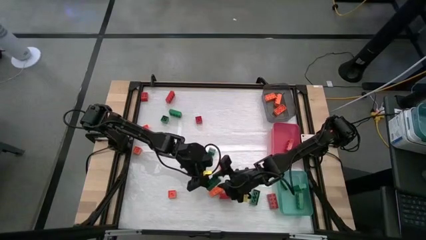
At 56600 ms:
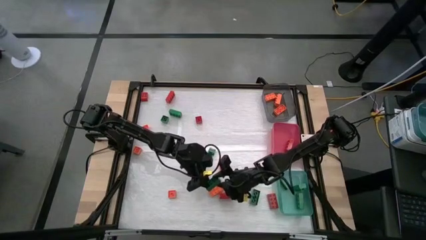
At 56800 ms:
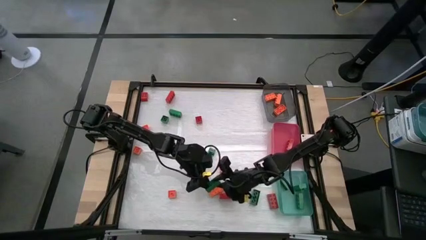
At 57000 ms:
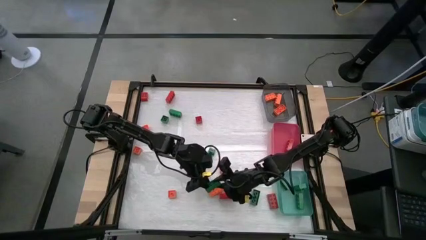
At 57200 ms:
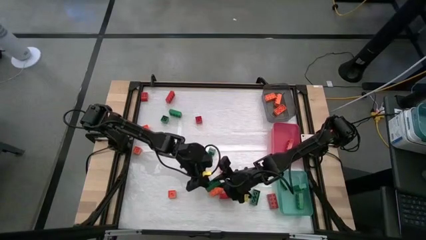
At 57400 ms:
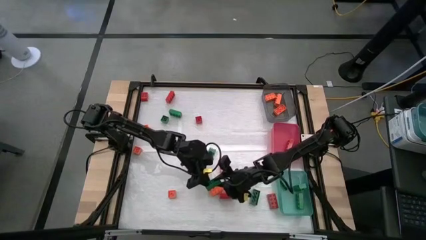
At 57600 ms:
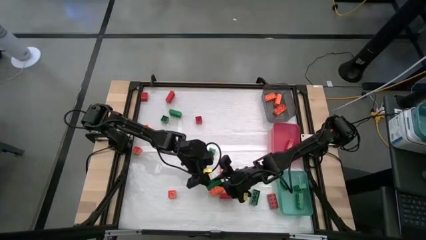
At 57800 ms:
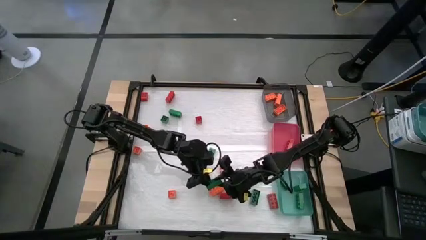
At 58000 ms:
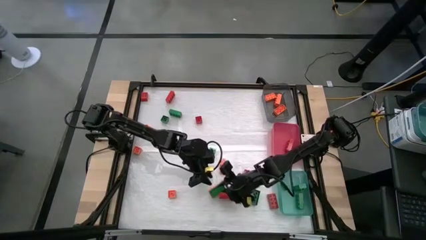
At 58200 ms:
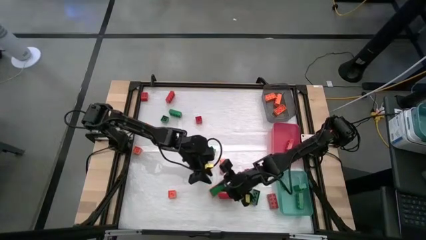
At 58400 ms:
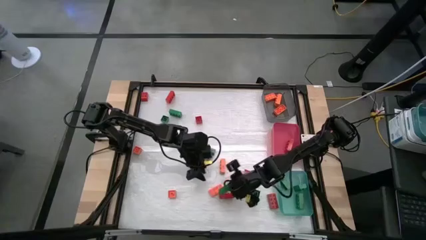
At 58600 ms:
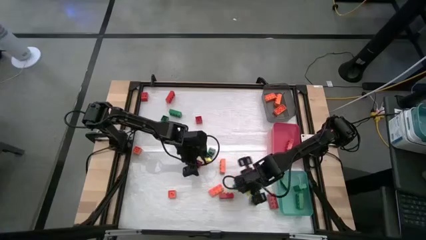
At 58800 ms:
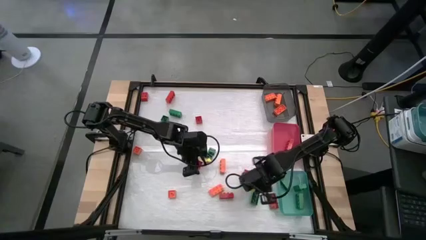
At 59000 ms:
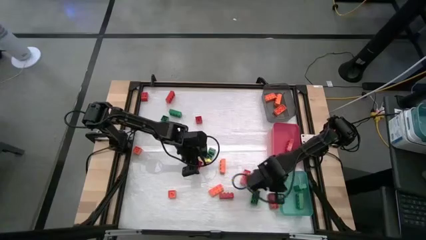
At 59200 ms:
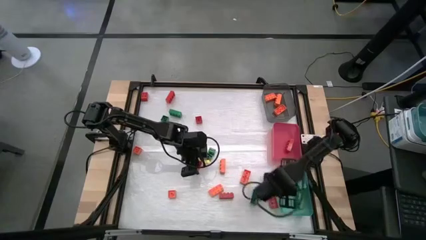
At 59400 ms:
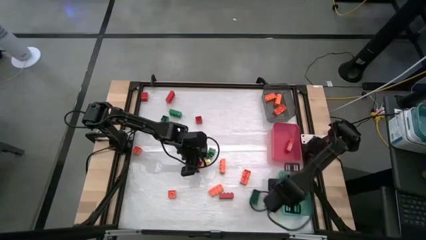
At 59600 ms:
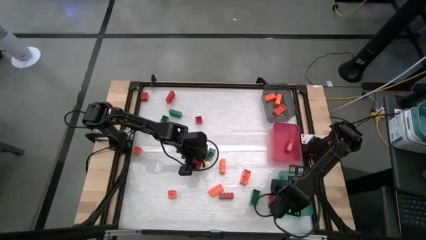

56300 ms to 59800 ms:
Task: Sort blocks
Put the green game piece into the blue bin

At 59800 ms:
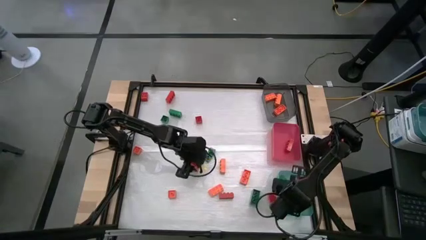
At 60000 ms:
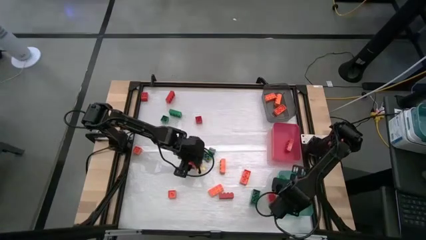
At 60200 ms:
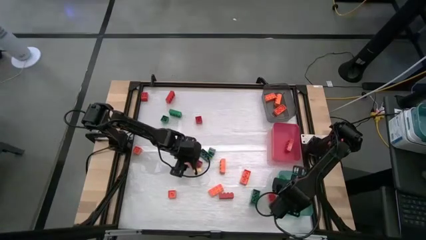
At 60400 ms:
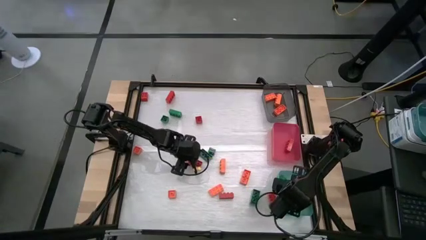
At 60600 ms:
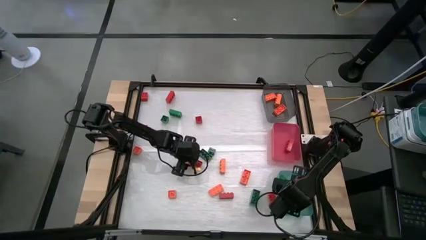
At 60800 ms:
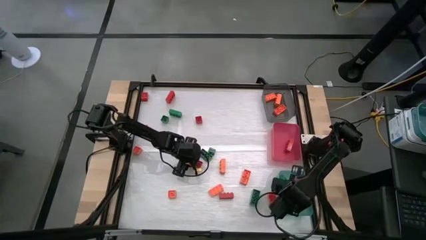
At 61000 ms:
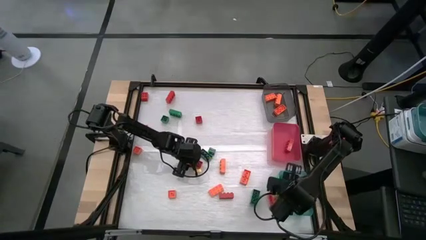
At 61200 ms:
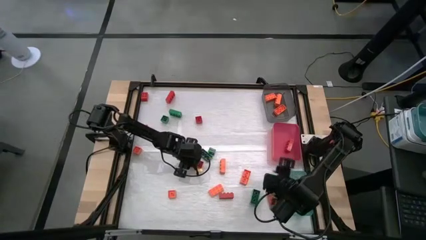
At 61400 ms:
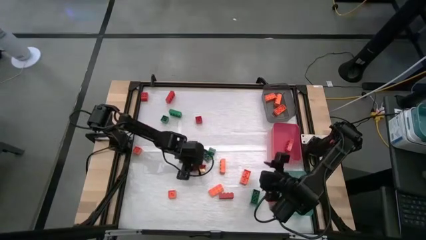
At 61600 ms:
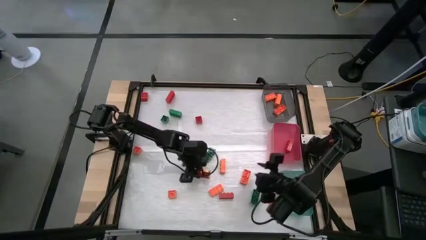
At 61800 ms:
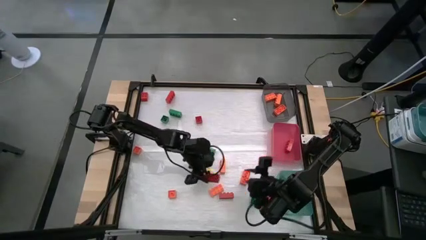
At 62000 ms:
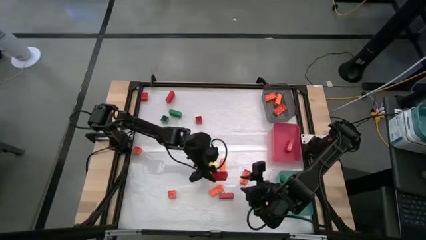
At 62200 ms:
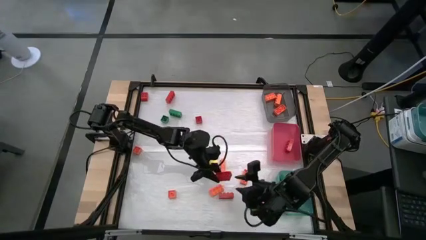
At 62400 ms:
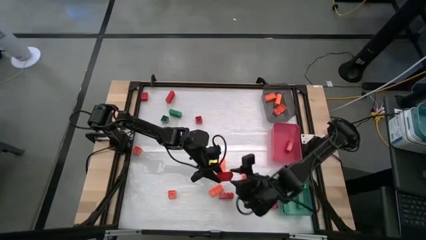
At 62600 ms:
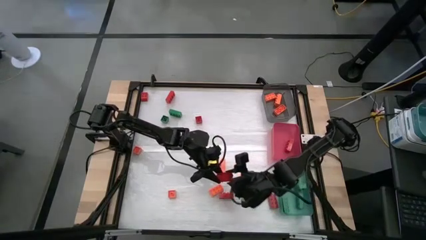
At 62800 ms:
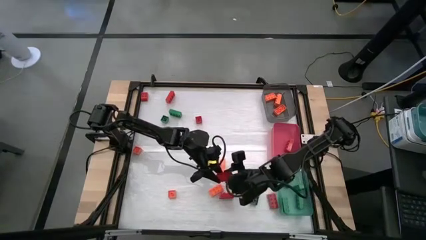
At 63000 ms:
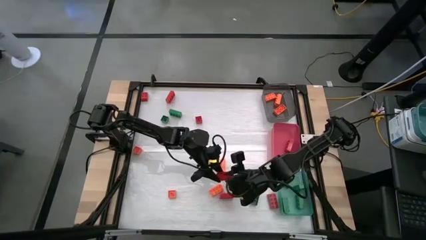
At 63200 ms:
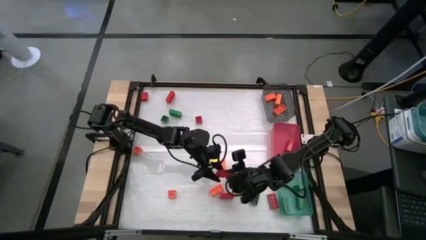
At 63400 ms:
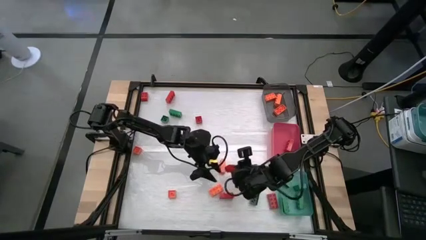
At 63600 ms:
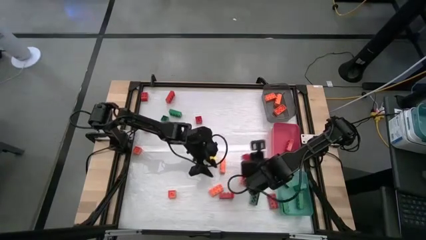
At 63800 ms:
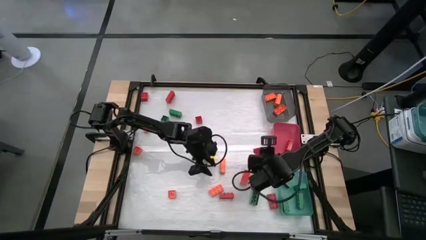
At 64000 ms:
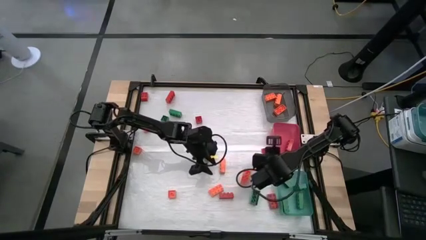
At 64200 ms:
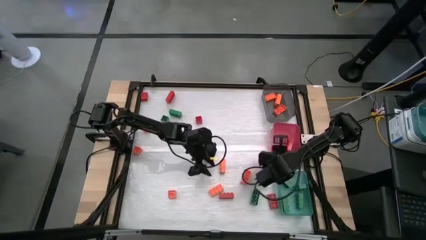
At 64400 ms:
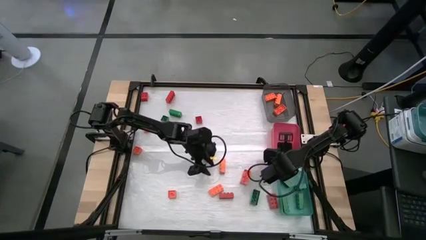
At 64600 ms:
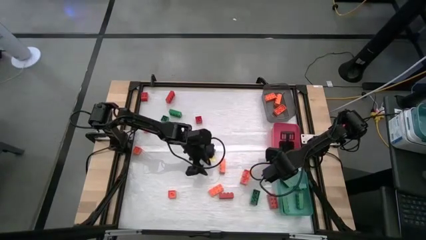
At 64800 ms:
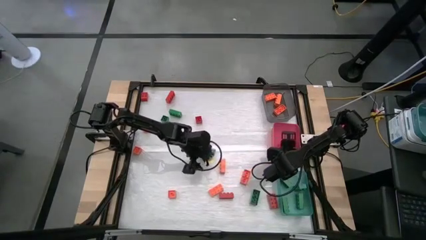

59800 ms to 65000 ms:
Put the red game piece into the red bin

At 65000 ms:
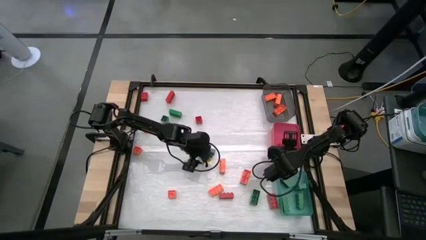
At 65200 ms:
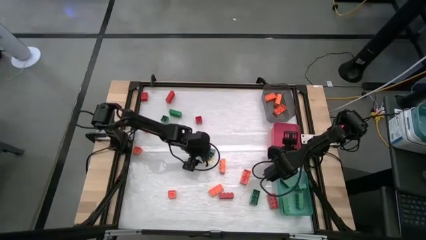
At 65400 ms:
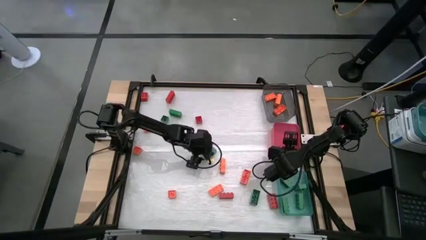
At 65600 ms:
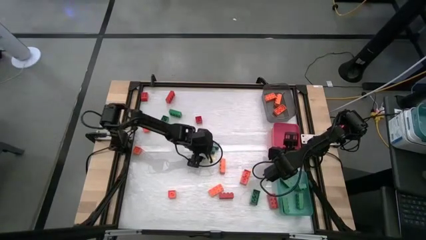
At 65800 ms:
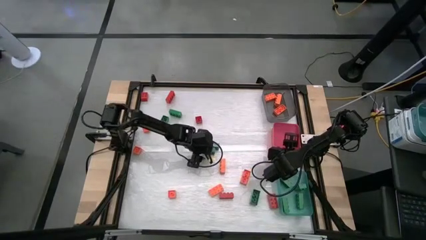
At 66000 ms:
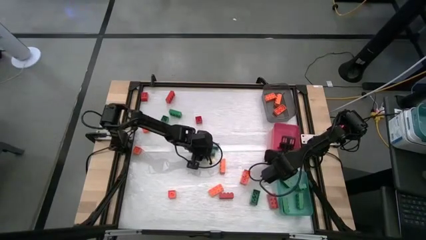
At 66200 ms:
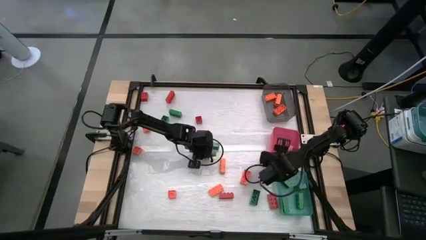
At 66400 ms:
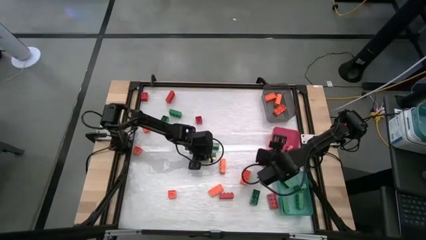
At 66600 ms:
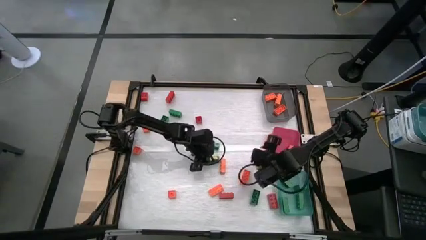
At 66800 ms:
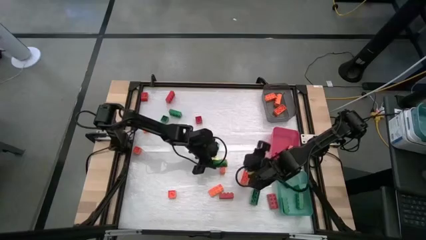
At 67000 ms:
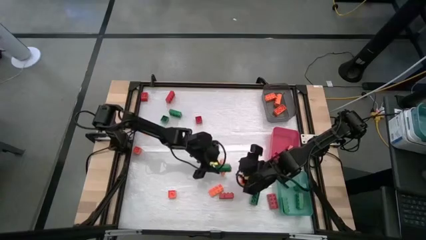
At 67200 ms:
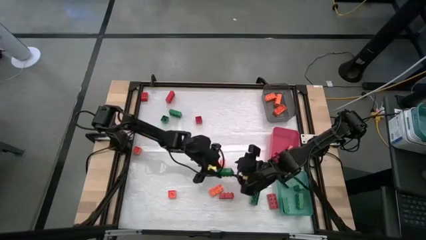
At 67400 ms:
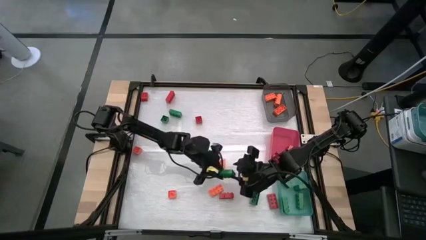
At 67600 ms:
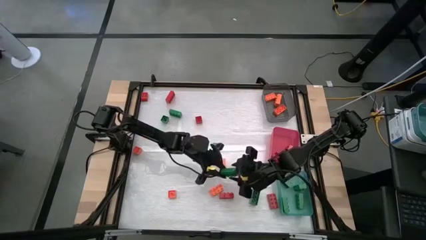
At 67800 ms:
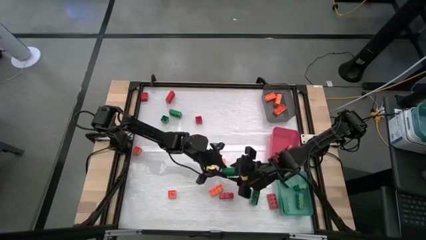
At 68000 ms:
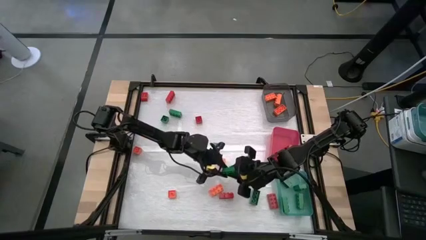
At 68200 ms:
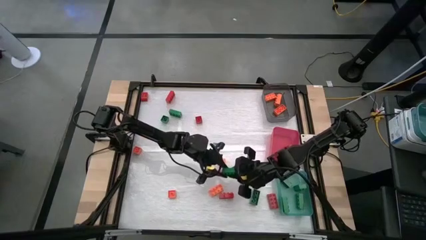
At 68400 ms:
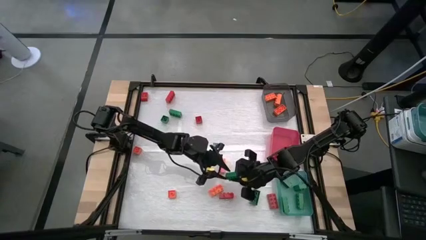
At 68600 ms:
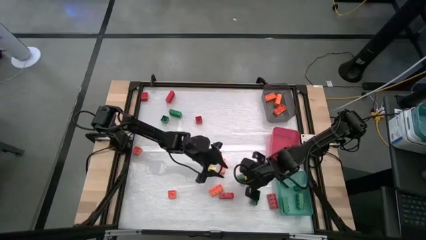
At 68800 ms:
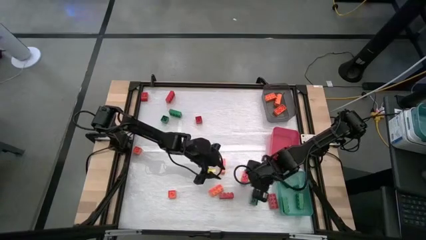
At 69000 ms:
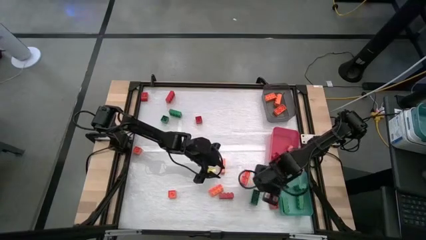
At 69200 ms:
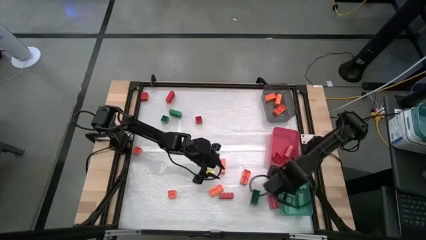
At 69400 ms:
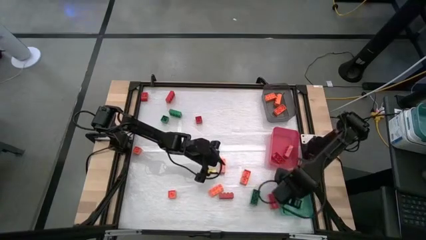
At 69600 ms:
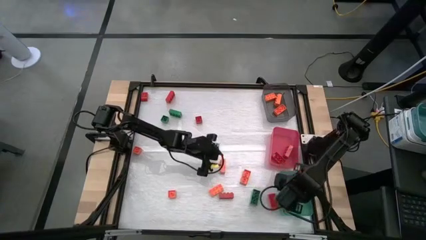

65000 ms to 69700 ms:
Put the green game piece into the blue bin

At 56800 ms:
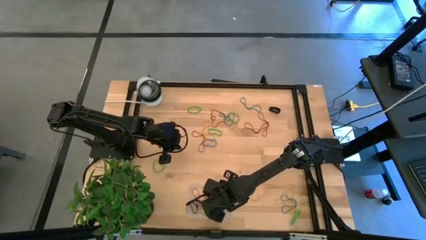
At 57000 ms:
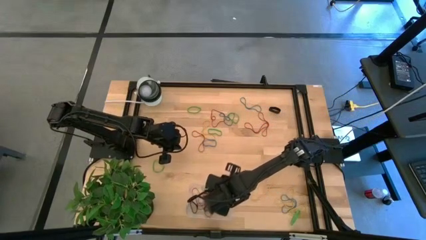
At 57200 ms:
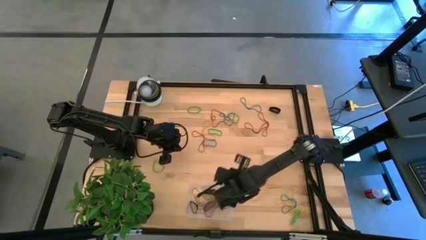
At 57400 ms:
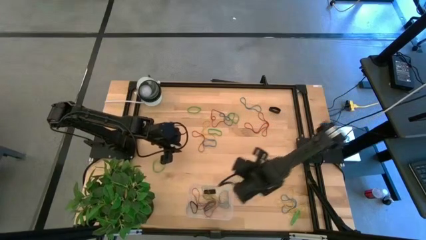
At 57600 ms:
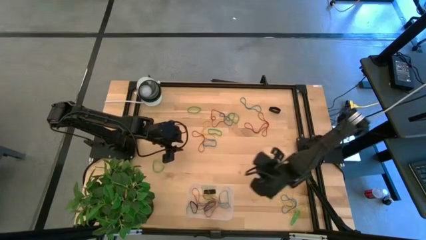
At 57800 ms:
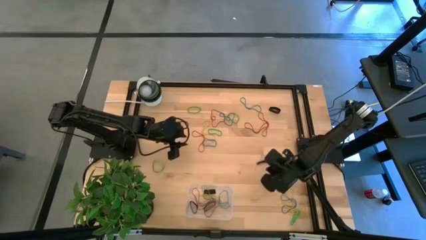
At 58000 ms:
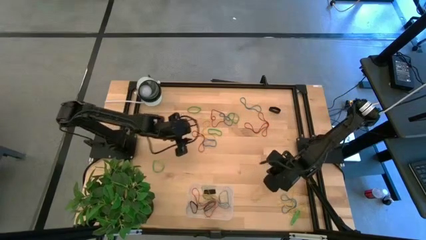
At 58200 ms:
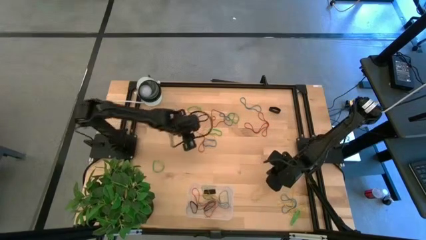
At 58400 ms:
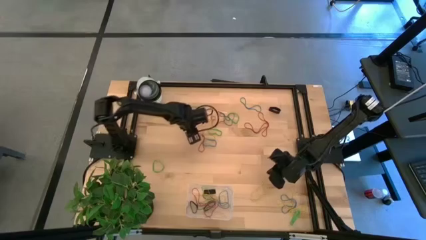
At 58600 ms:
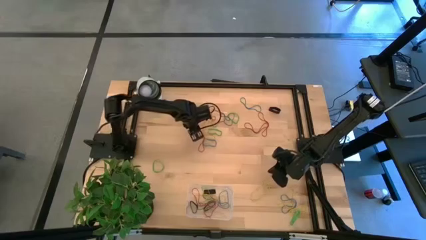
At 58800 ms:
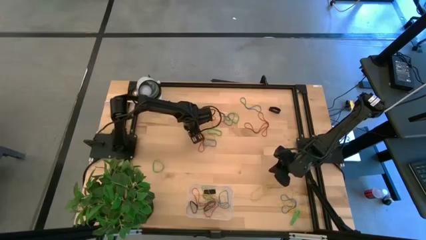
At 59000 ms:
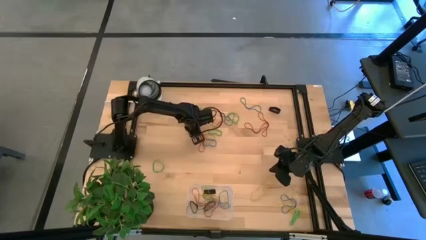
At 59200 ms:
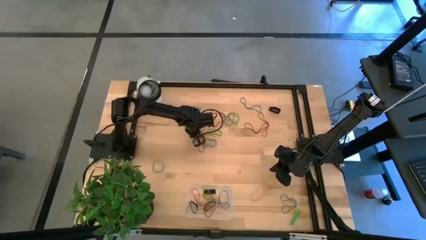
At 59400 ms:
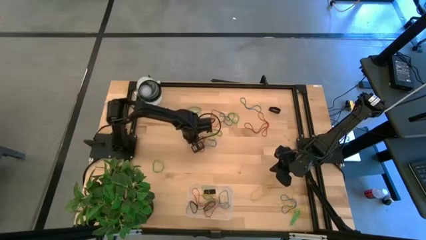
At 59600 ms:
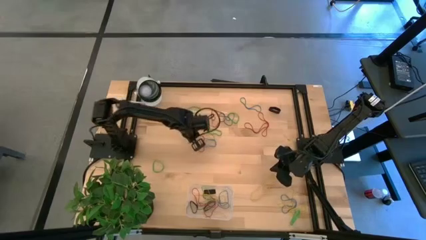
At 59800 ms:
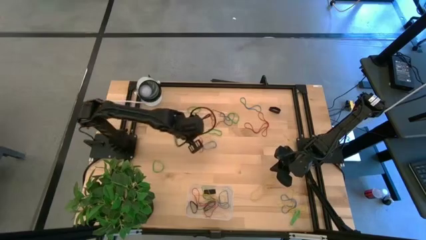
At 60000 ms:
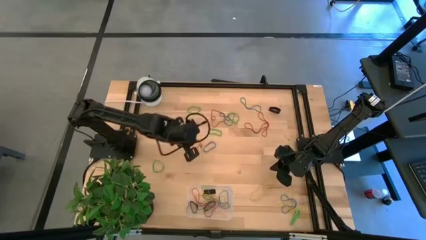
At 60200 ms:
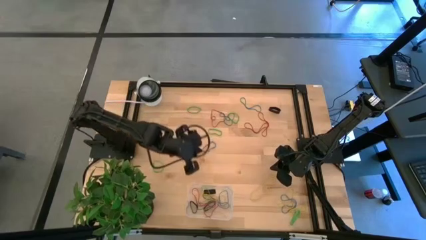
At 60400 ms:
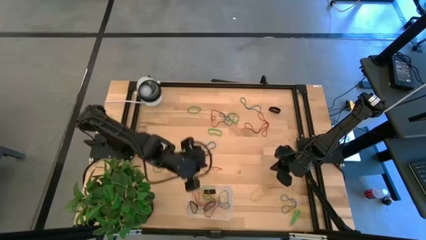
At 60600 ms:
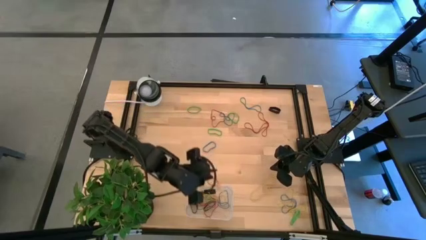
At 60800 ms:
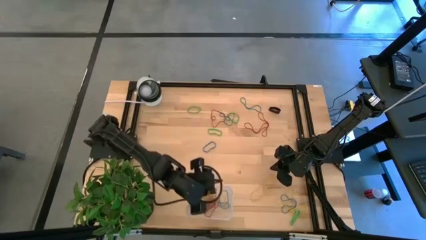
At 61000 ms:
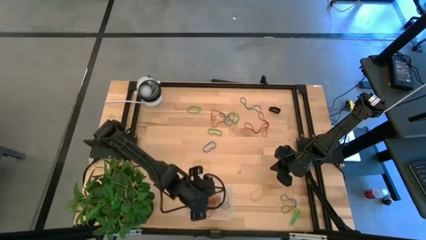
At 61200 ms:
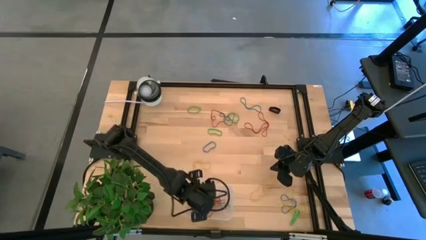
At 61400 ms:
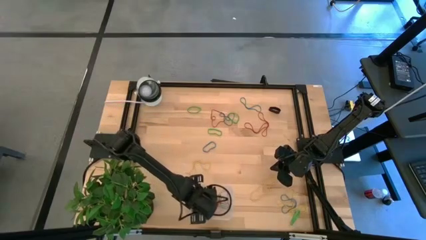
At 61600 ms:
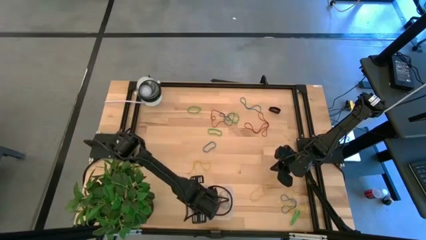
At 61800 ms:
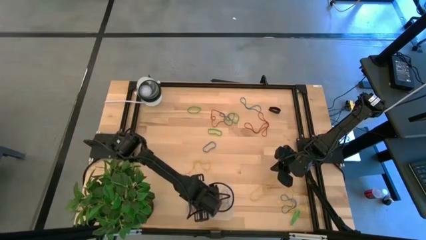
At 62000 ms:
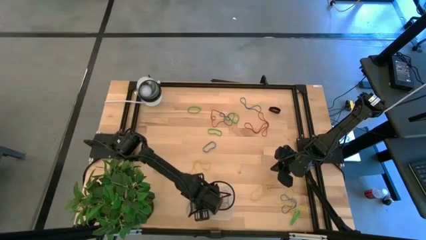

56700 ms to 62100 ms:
Task: Pick and place rubber bands into bin
Put the red rubber band into the transparent bin
